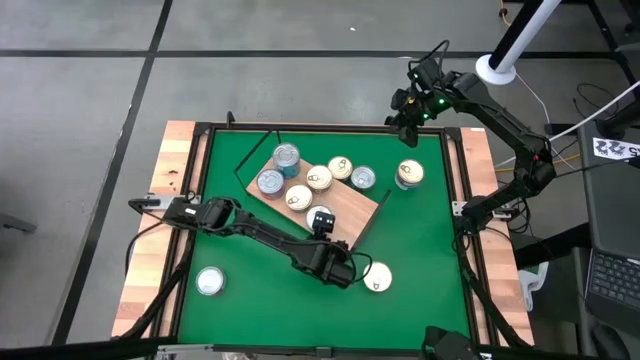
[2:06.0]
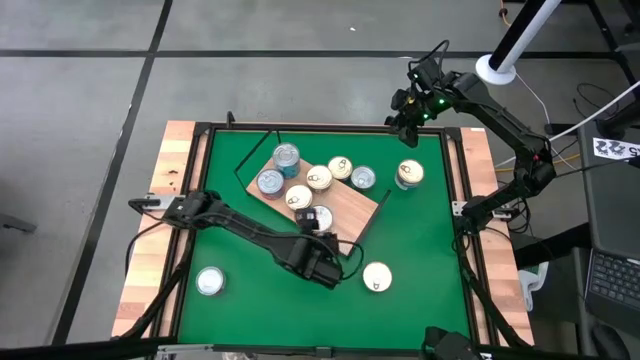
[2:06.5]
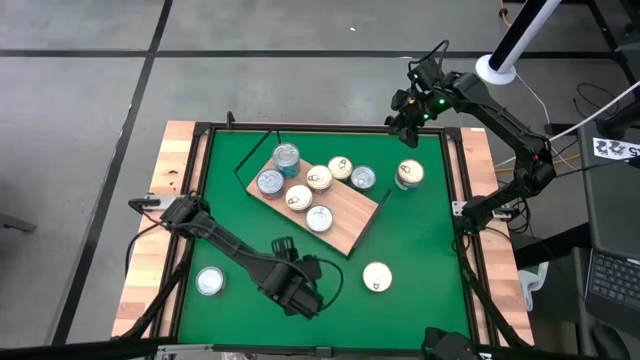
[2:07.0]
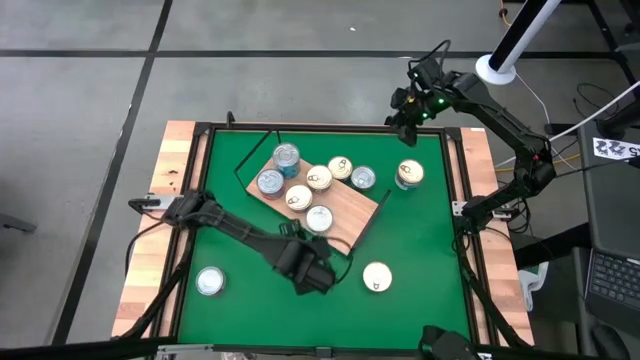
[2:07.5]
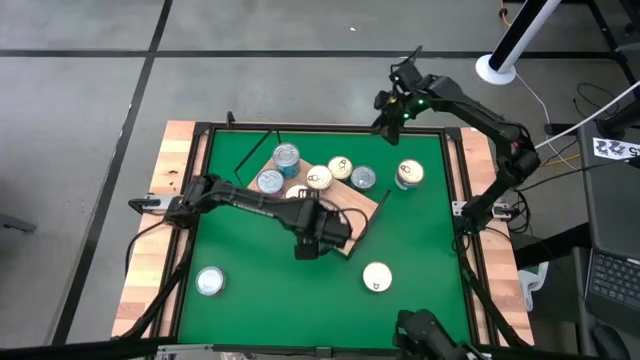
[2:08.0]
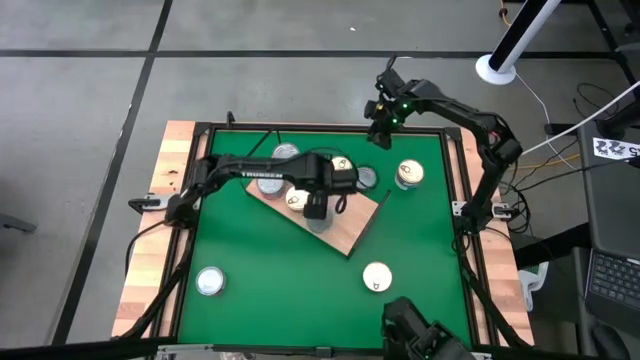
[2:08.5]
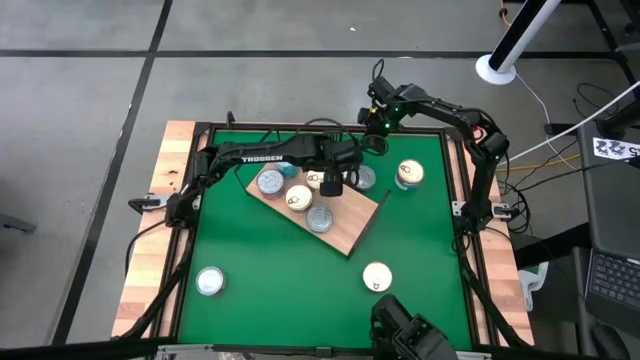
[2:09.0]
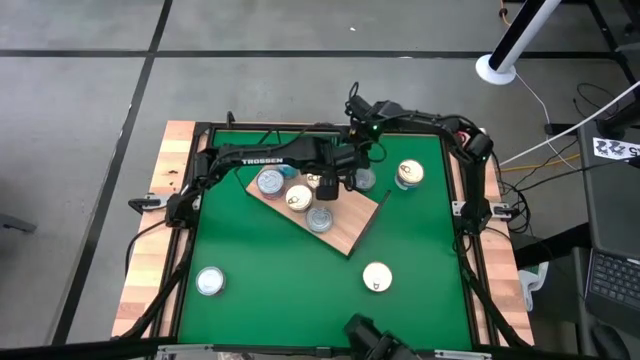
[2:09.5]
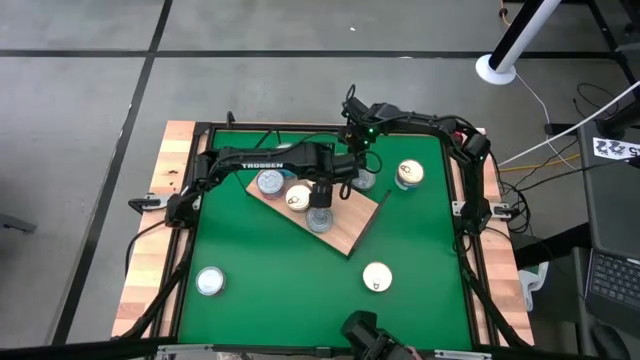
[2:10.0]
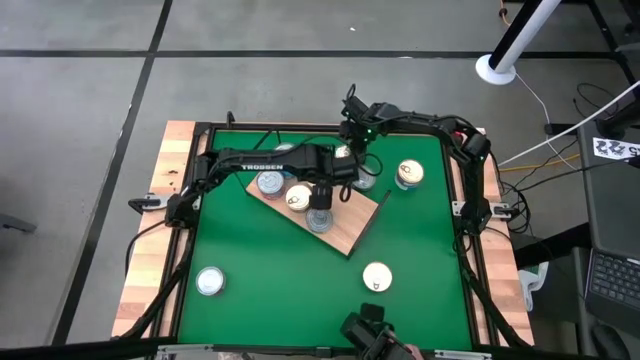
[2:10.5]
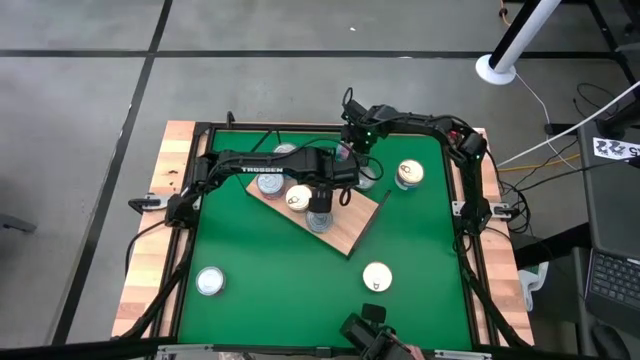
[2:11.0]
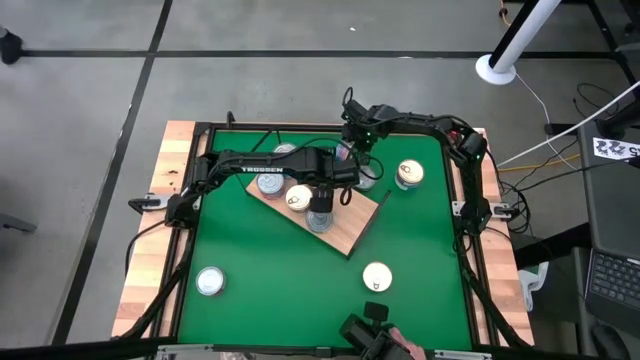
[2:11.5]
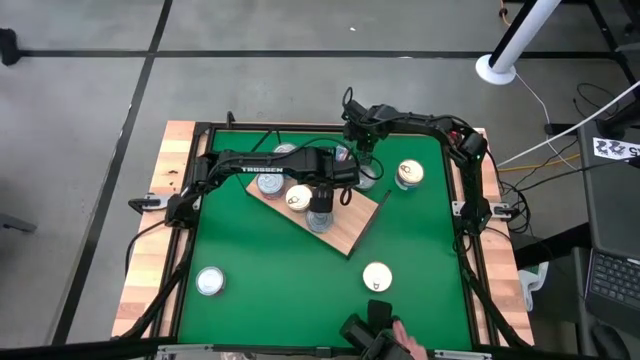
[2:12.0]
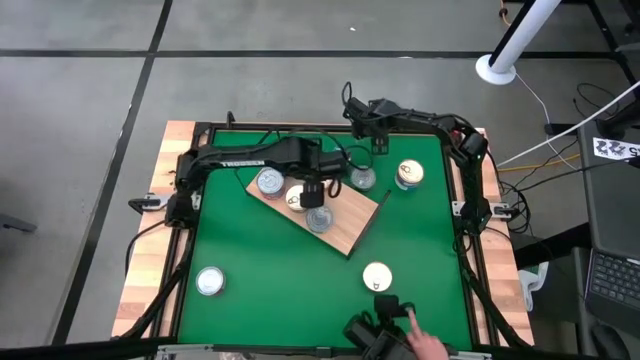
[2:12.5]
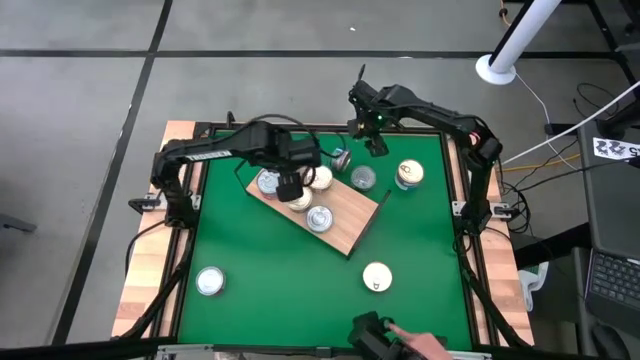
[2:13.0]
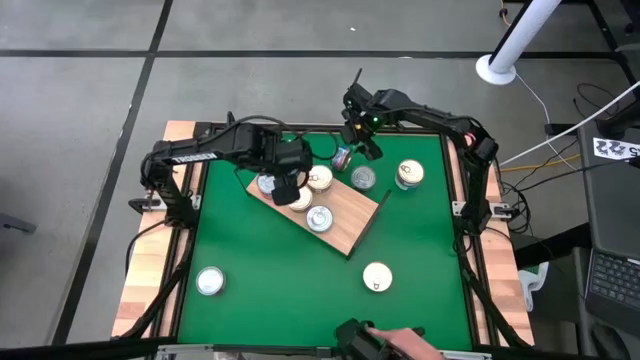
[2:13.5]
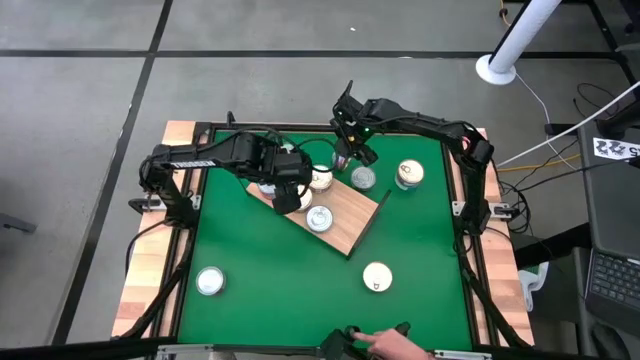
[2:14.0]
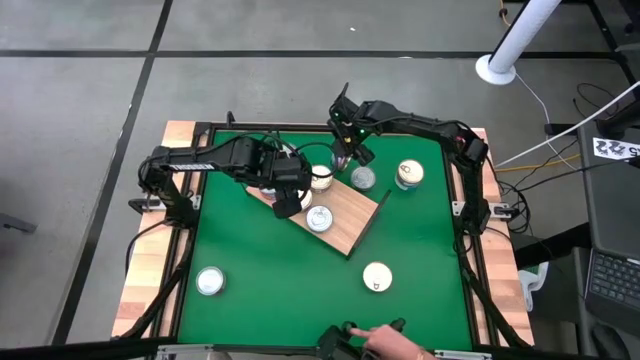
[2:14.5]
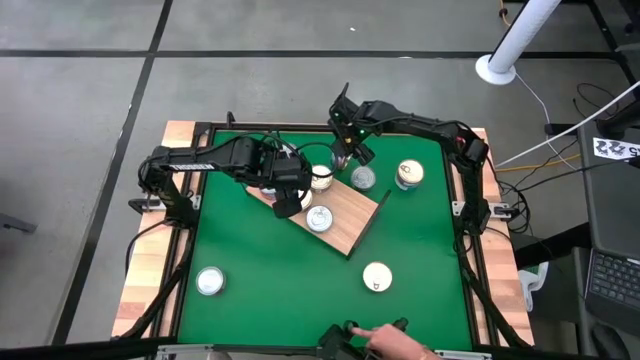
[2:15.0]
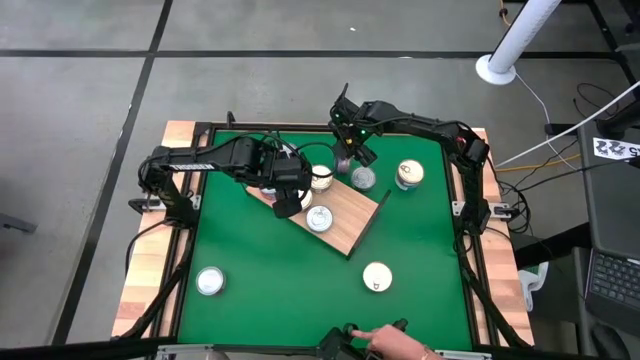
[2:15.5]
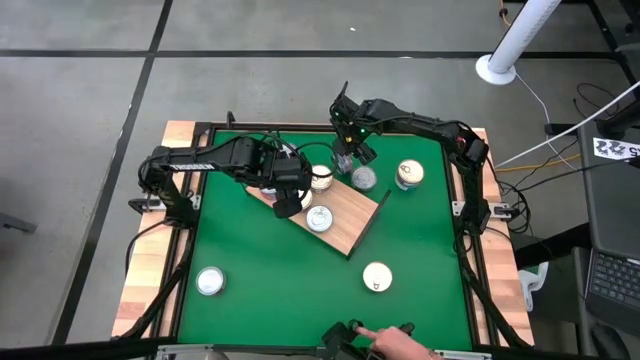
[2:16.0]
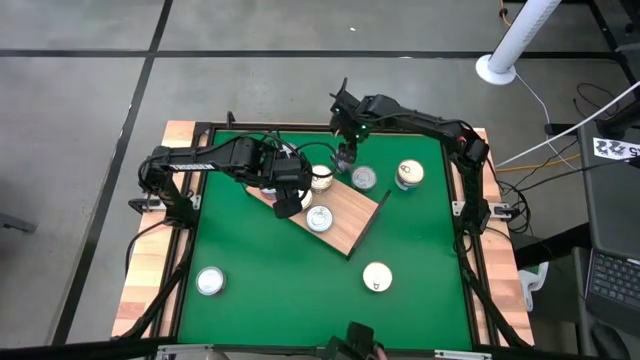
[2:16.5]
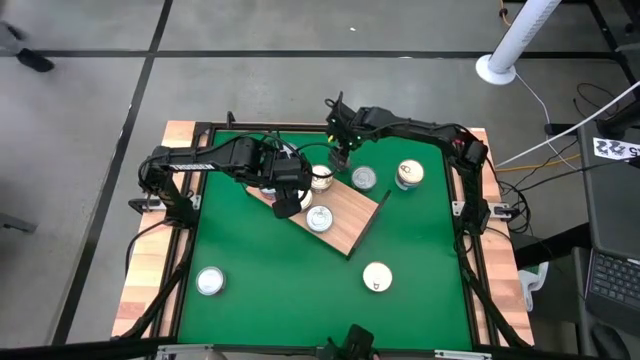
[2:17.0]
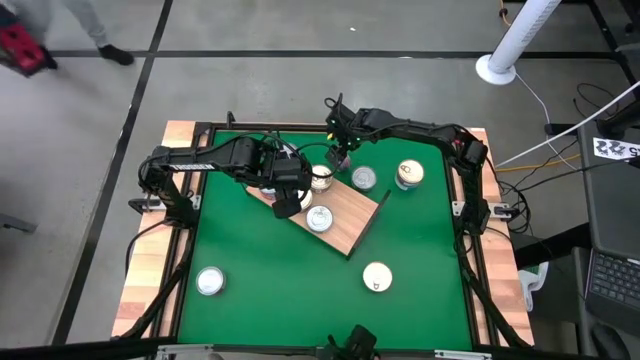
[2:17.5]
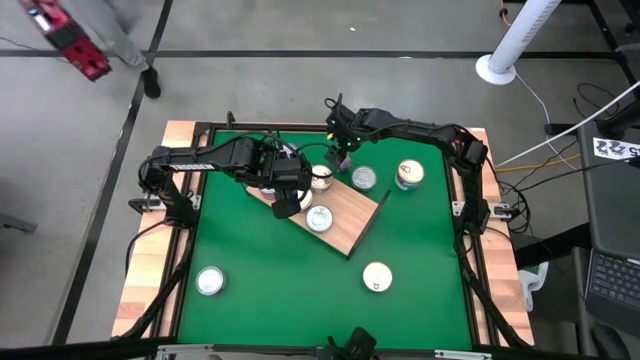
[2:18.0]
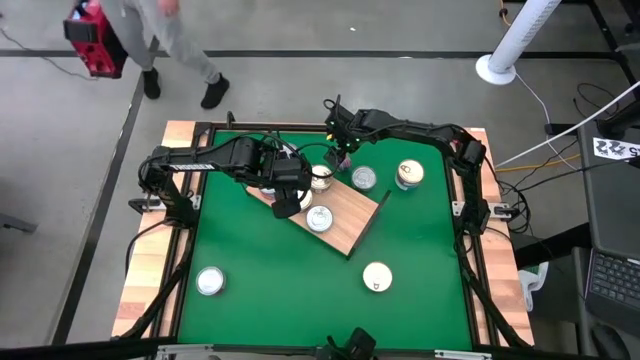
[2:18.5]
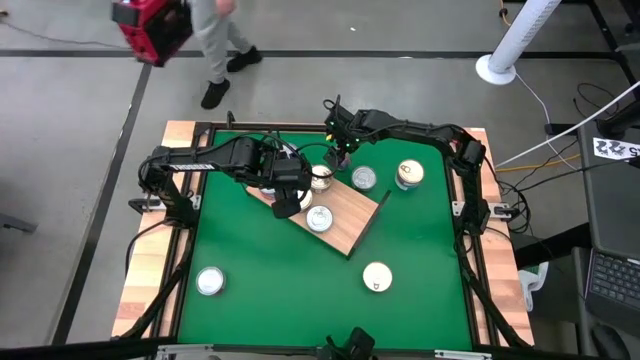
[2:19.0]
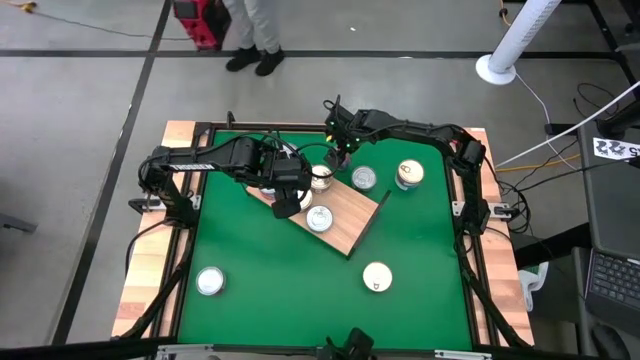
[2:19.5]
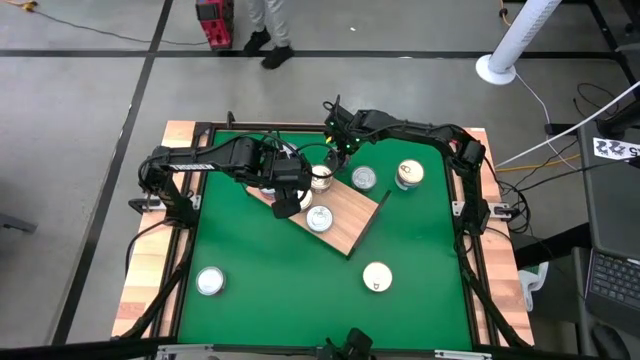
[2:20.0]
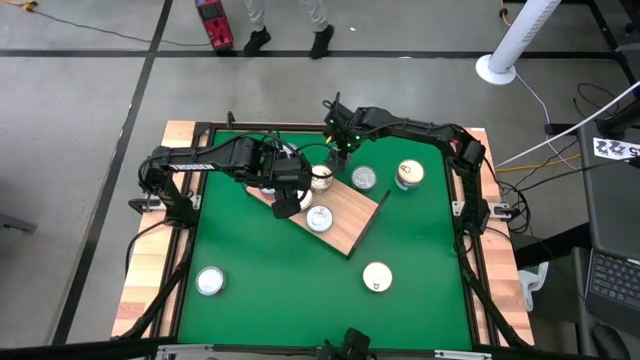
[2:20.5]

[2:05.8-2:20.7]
Task: Stack canned seafood by type on shelf
Stack the blue and pink tuna can on top of the blue and pink tuna can on the shelf

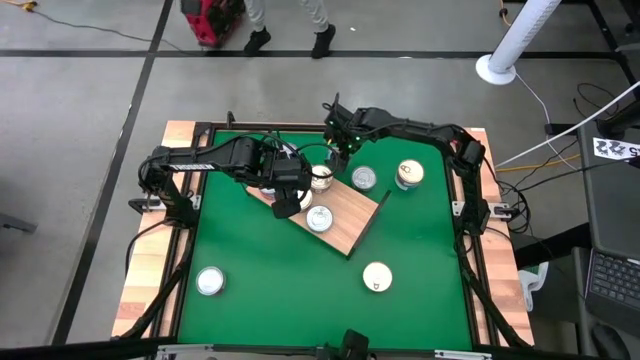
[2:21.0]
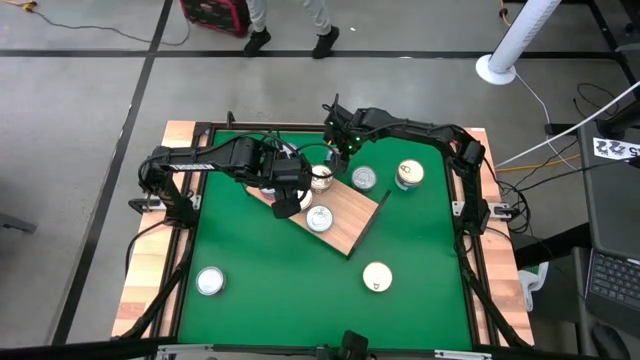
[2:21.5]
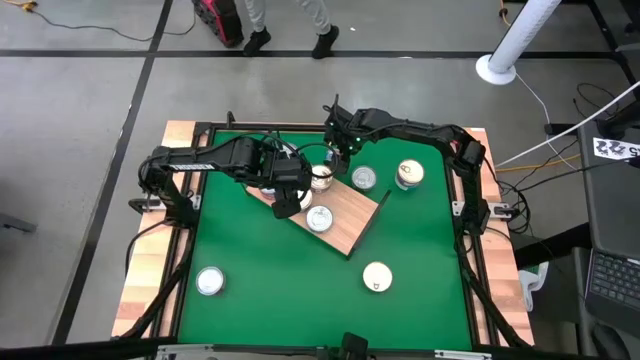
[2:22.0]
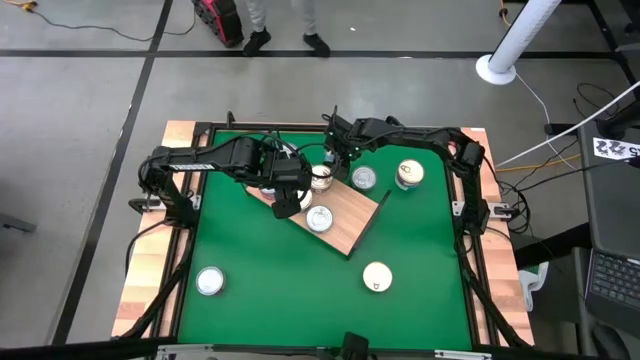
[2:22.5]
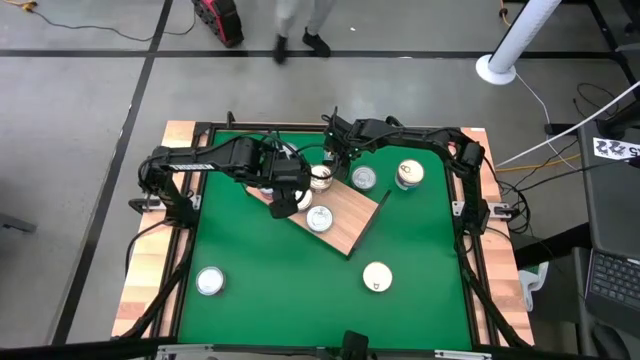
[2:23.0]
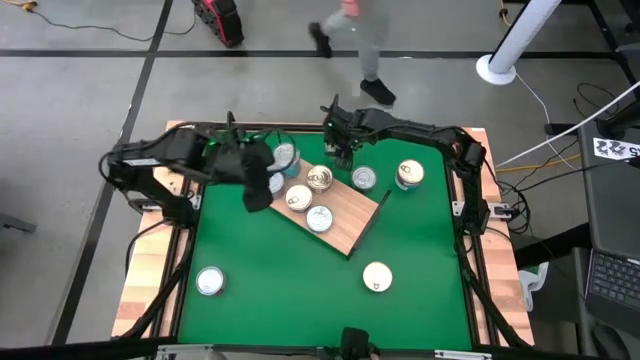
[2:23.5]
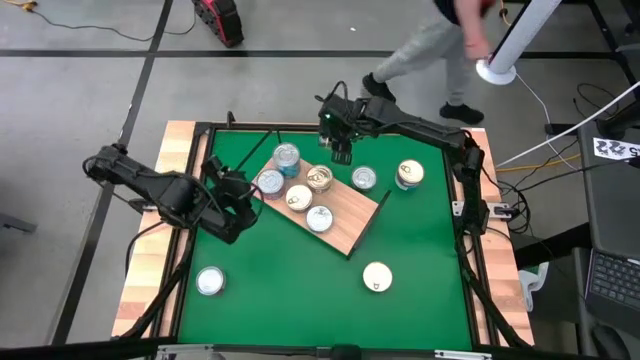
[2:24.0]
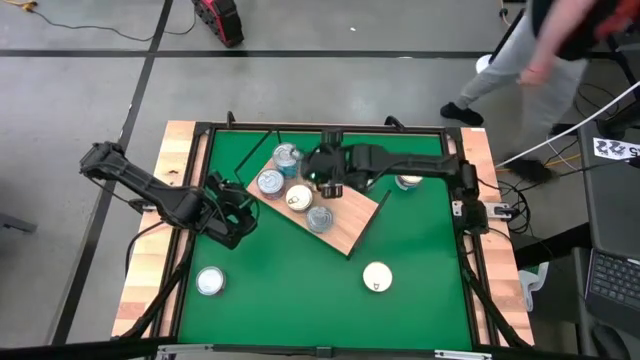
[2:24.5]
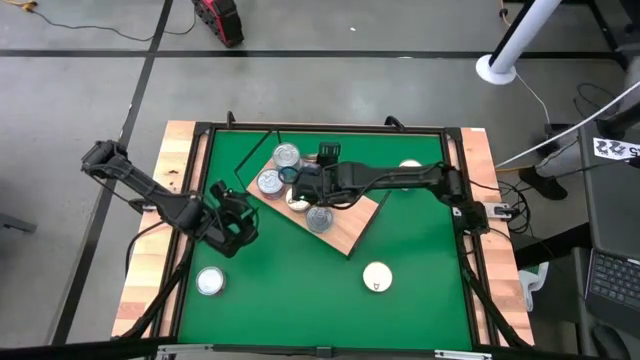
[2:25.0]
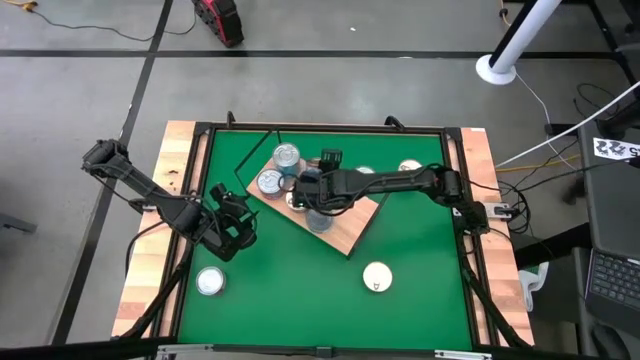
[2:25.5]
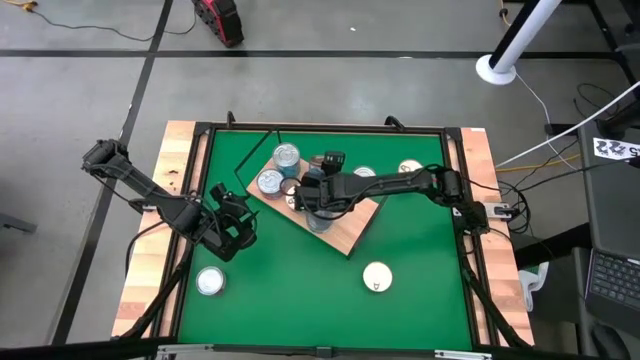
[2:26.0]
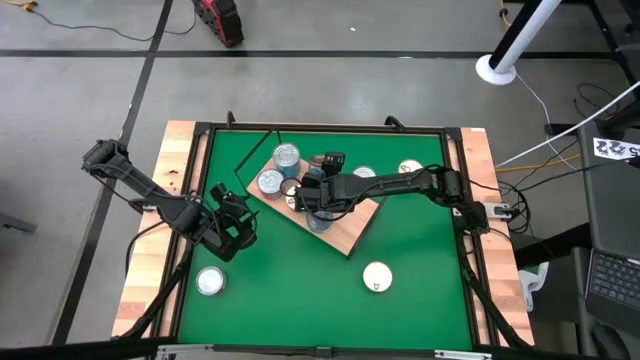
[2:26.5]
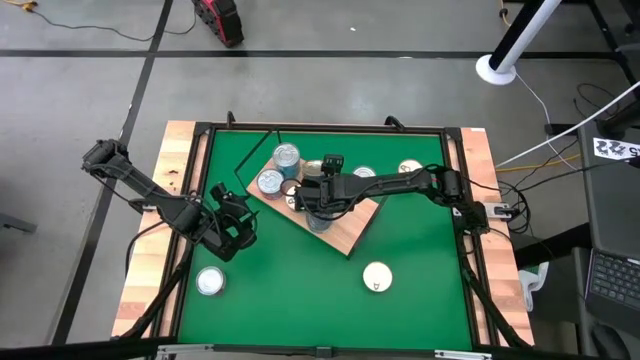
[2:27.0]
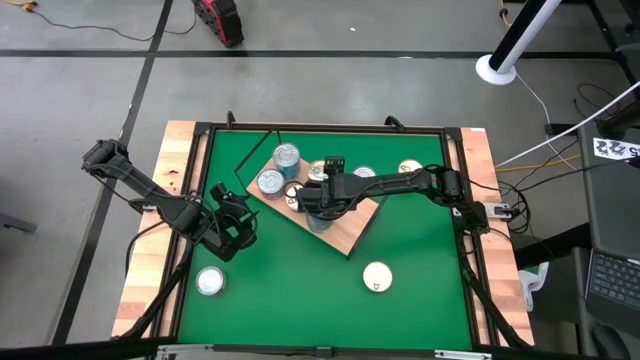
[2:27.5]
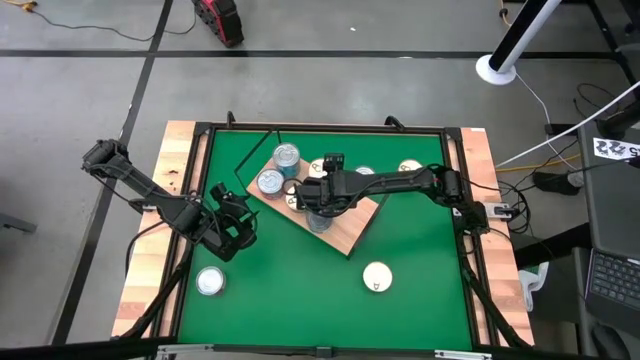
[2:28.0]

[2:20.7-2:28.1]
Stack the pink can on top of the pink can on the shelf
